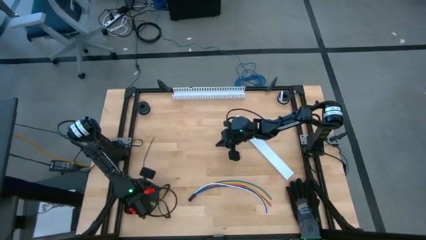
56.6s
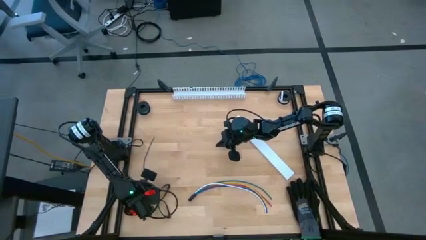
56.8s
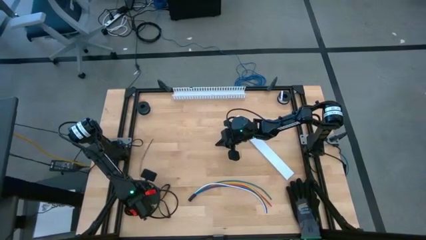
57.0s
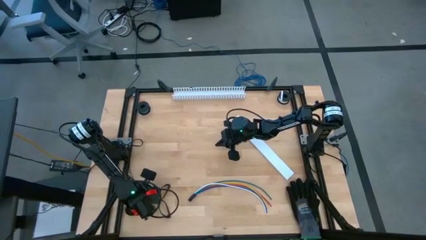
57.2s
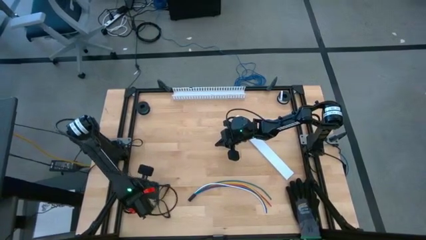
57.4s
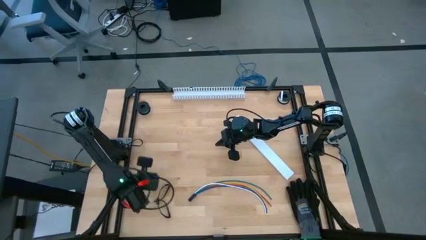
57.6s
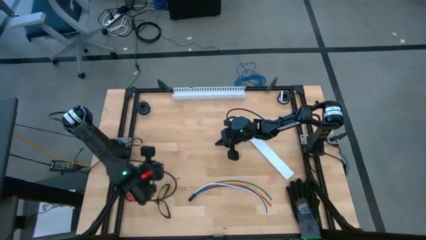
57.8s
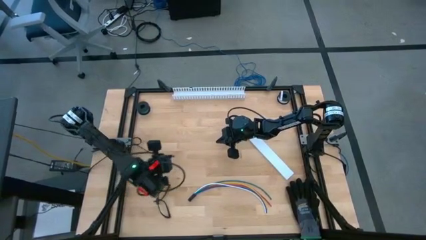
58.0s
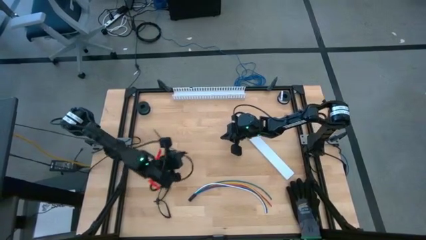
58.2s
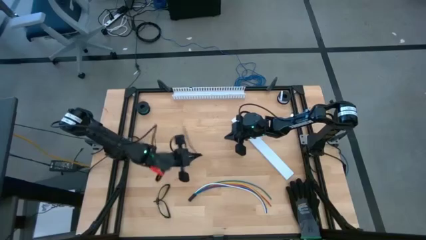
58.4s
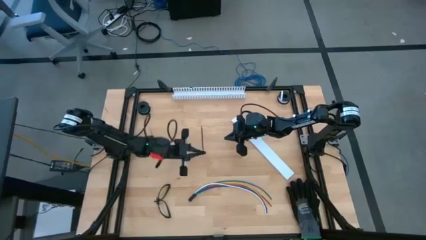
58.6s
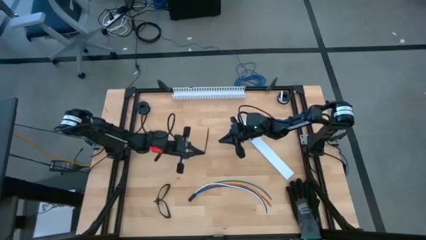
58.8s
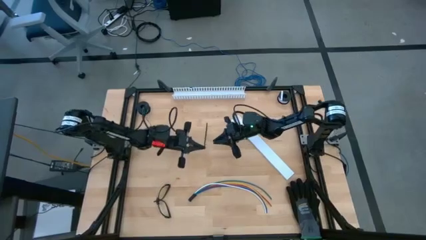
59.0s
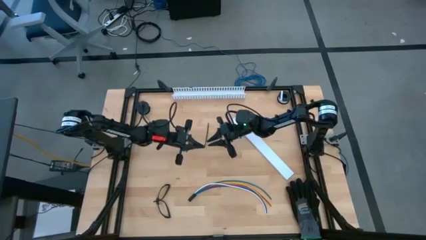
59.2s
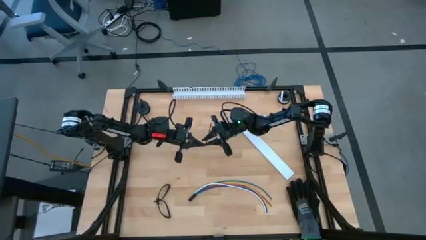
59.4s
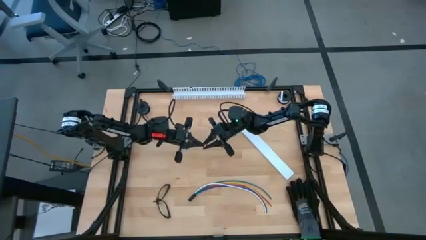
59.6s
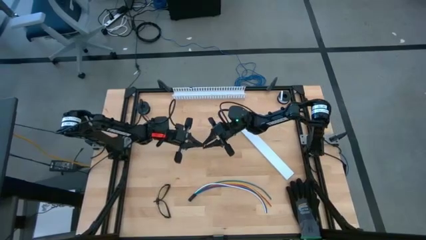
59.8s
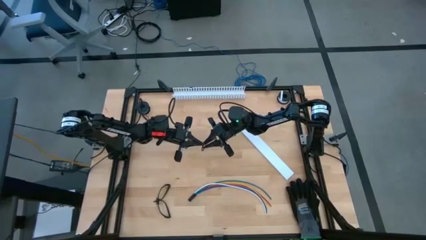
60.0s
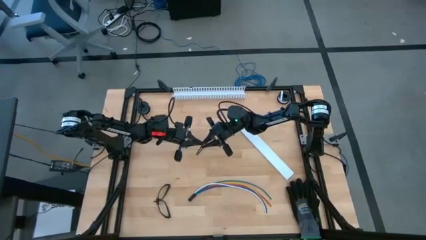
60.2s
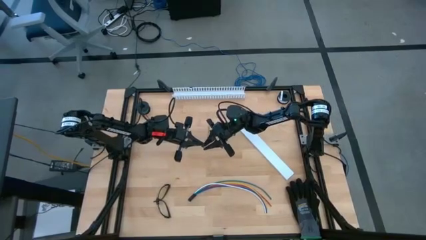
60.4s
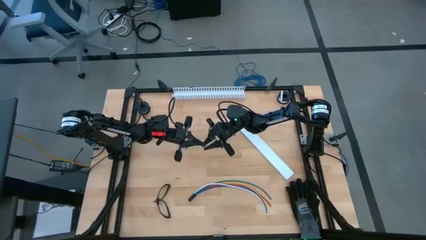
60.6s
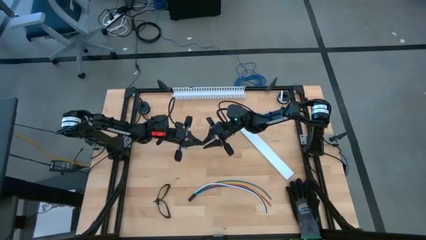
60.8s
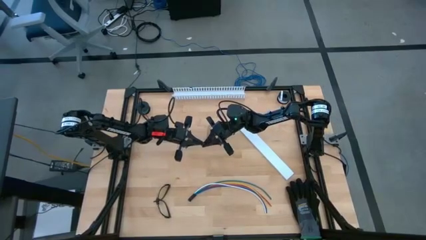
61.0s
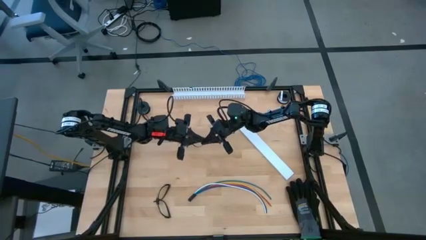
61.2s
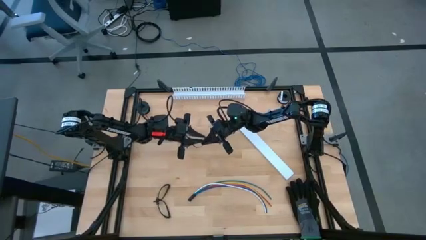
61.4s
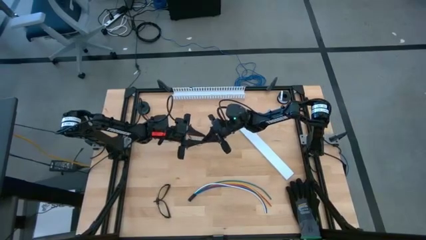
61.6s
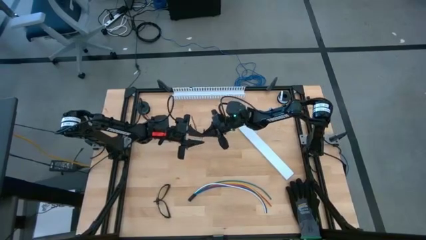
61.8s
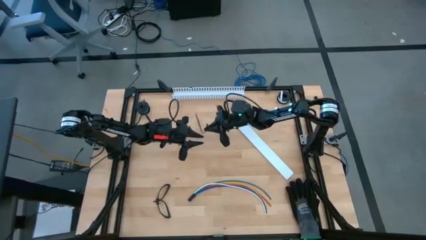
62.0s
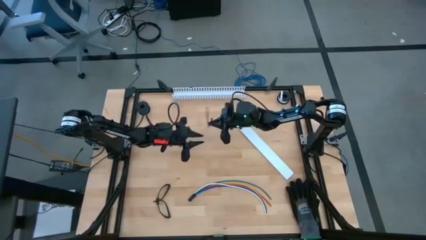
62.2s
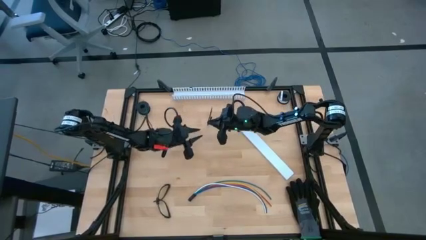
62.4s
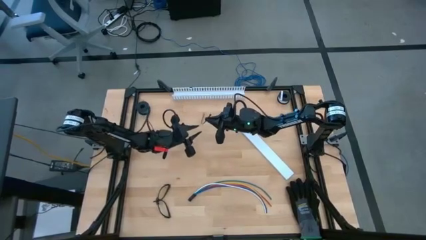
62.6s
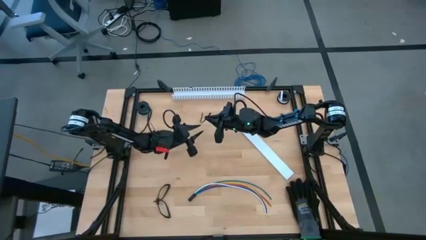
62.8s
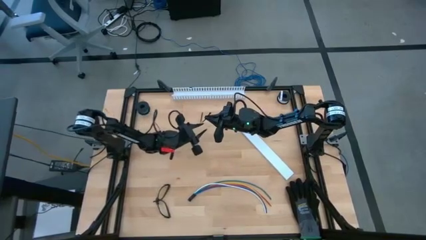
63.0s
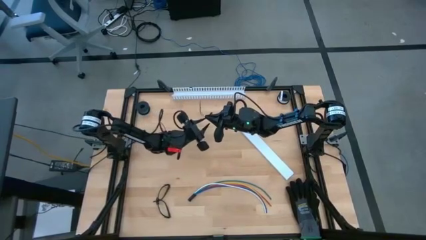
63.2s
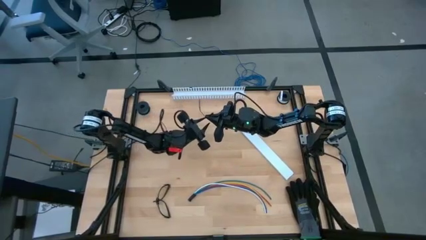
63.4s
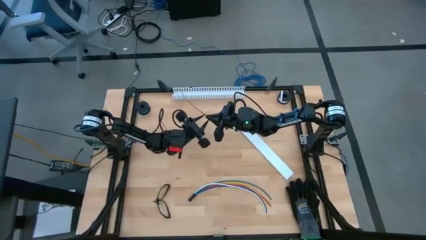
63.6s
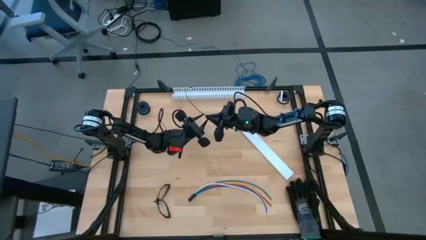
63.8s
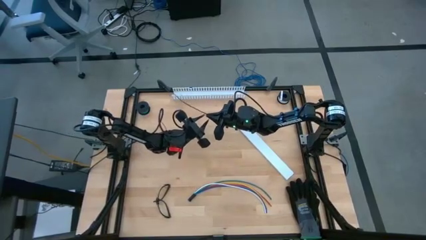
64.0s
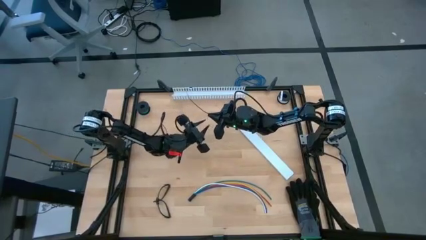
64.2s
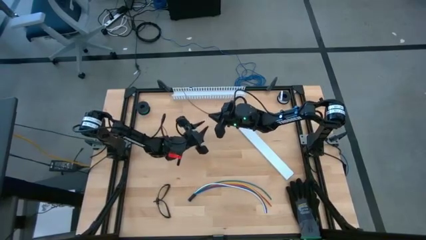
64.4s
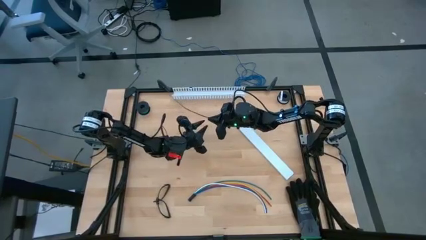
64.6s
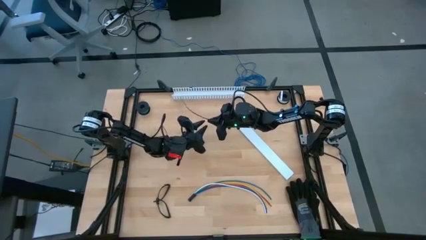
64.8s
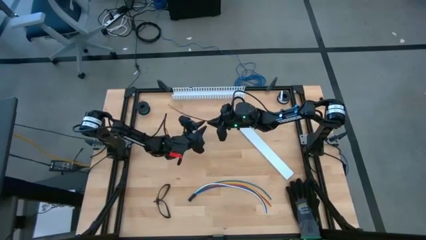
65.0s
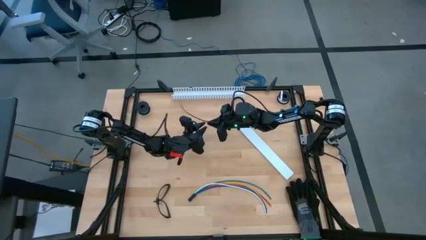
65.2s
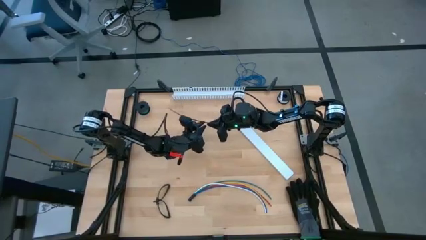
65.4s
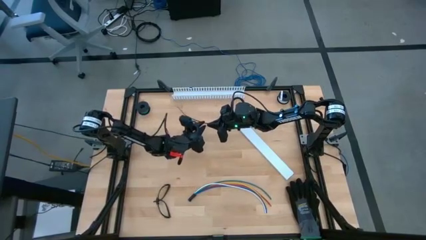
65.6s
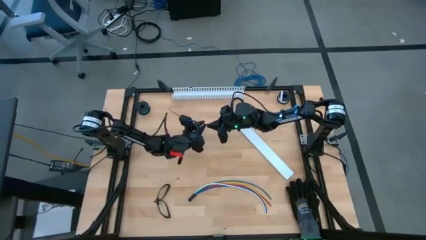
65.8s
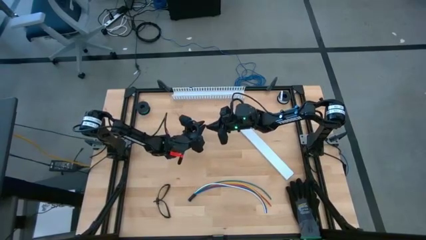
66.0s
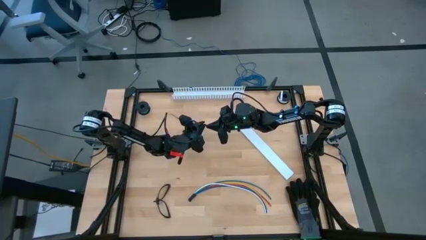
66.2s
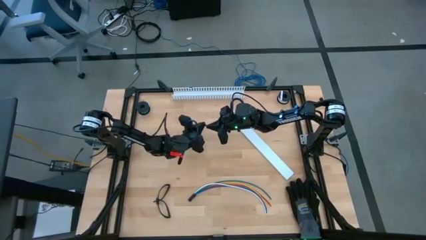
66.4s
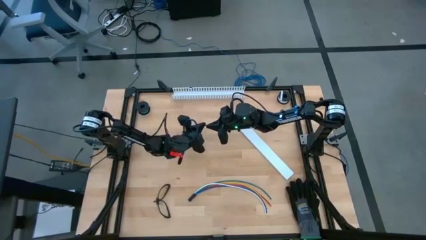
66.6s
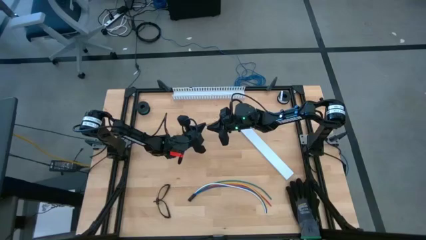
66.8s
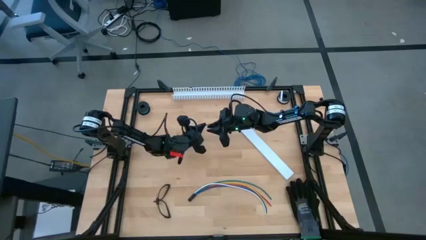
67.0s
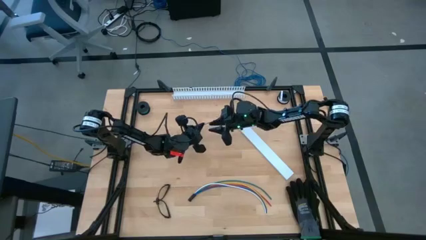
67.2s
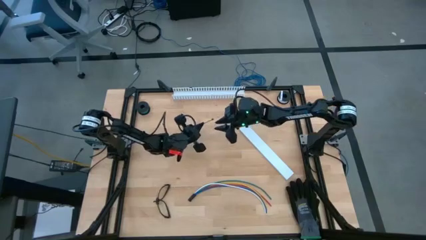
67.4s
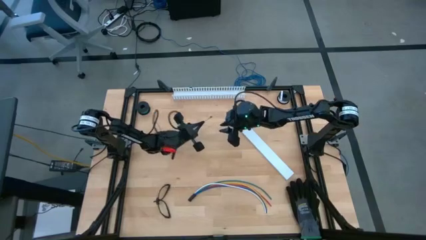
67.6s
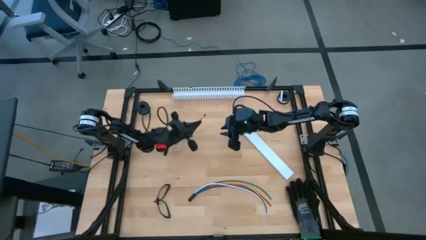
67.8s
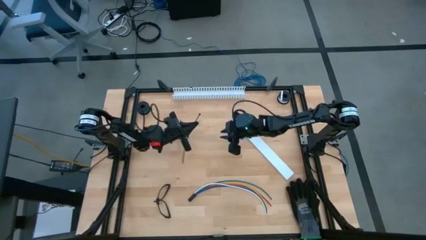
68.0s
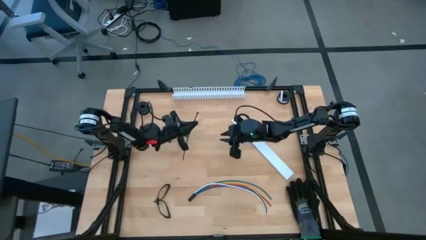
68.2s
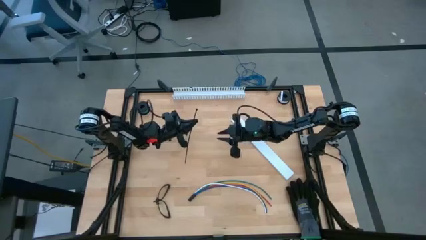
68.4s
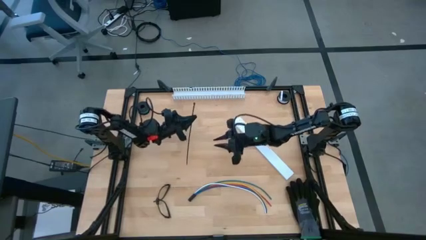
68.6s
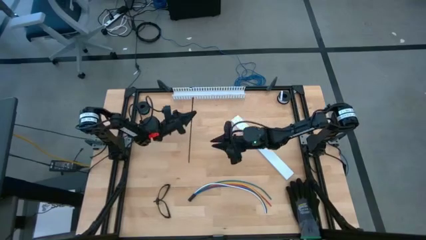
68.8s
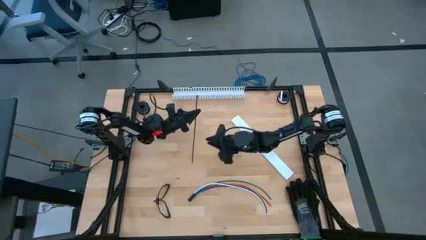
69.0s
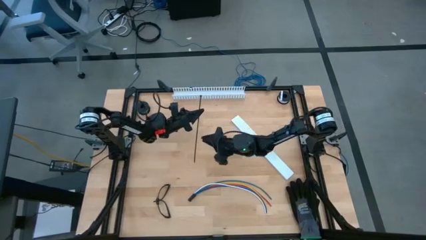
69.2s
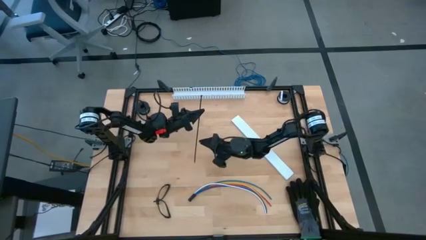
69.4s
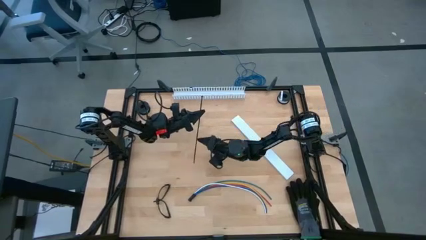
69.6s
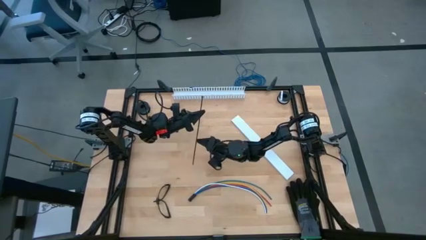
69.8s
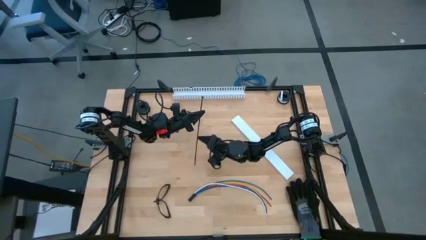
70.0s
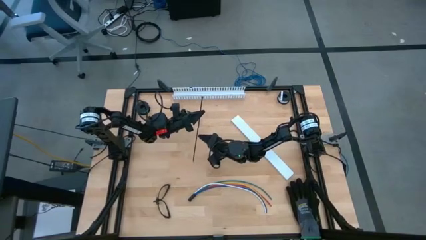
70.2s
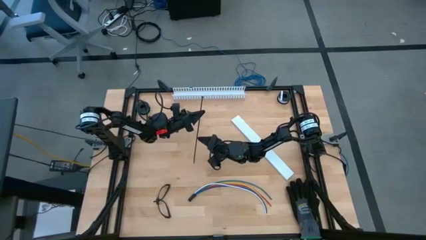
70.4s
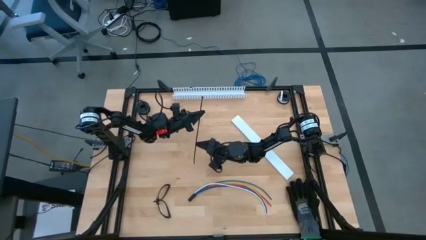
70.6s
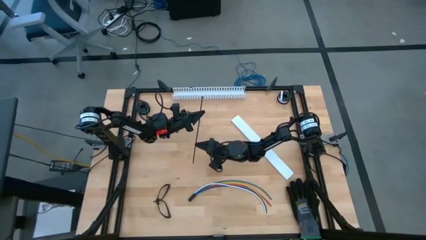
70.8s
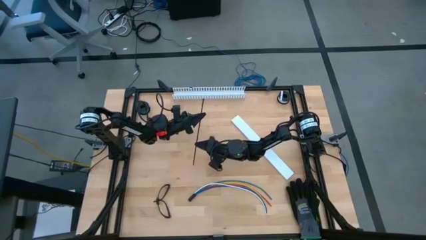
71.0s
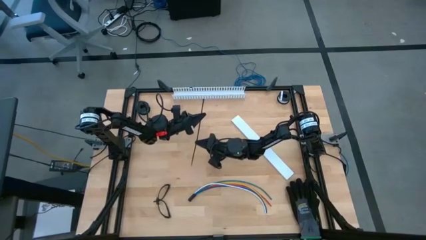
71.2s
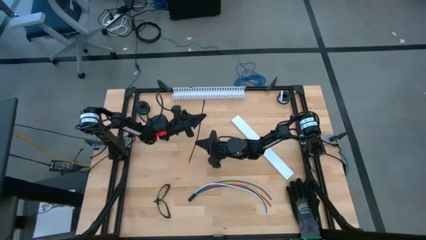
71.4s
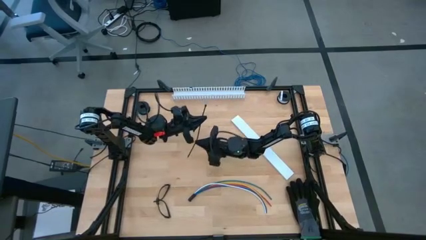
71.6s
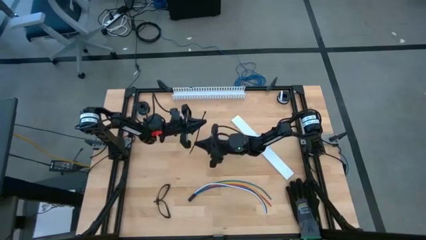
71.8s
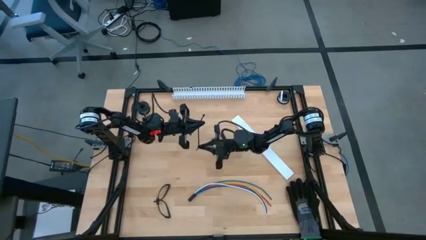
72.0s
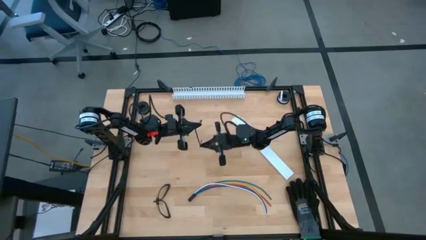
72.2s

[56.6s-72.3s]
Task: Ziptie cables
Wrap the zip tie around the cable wires
